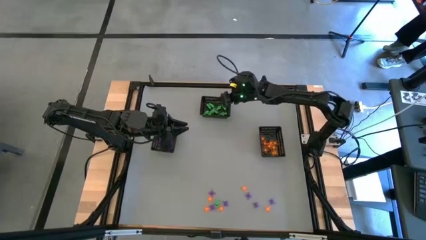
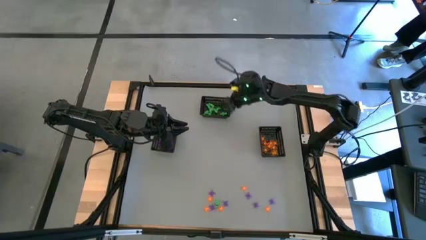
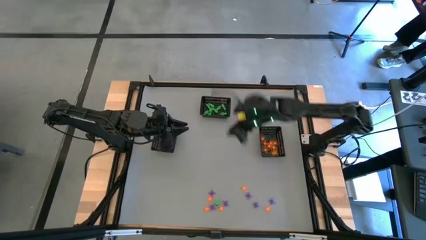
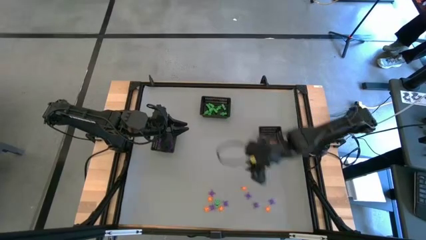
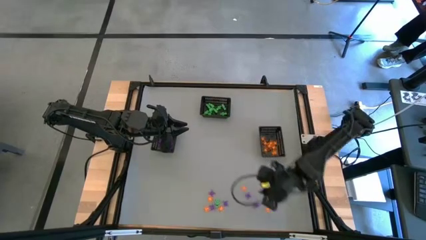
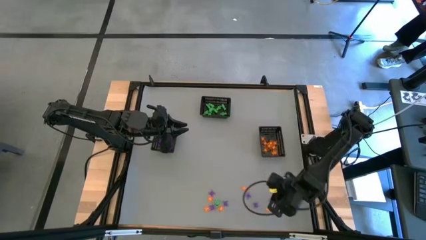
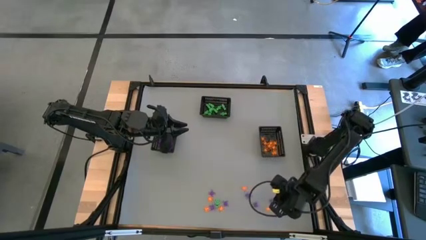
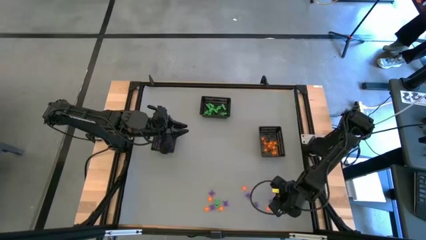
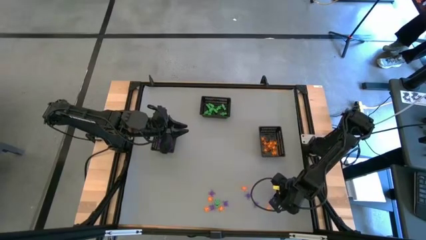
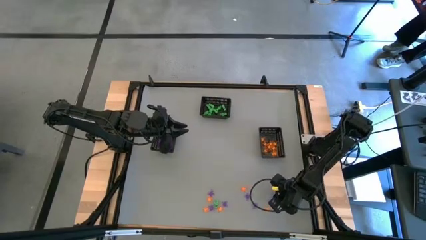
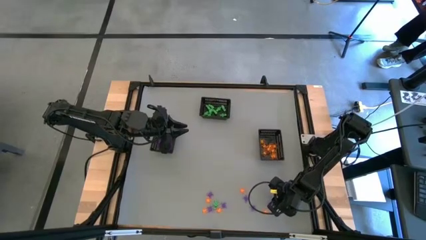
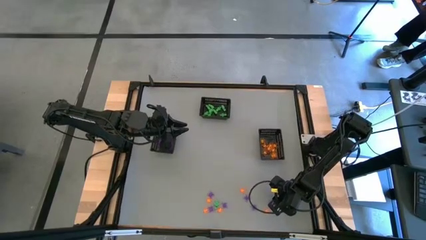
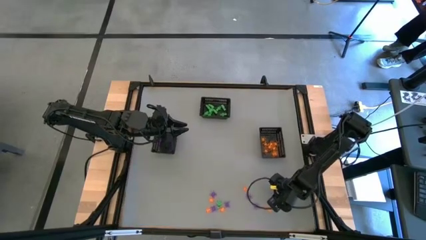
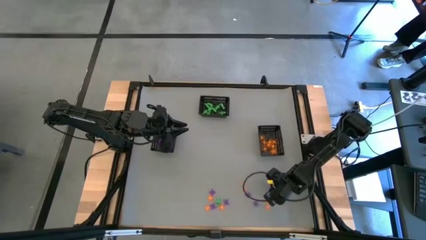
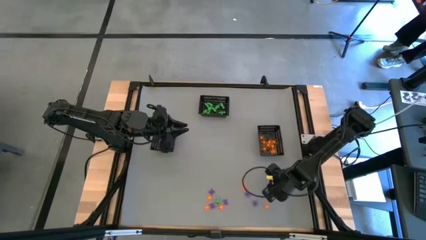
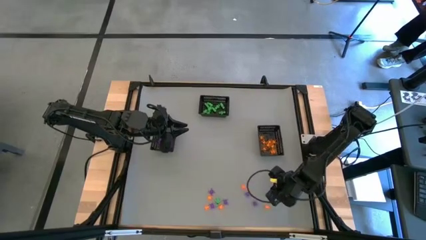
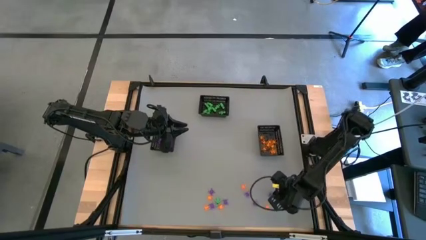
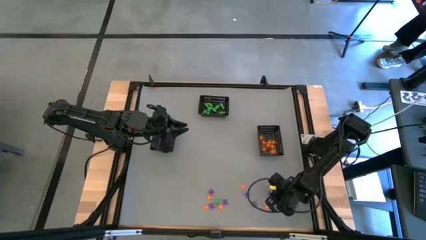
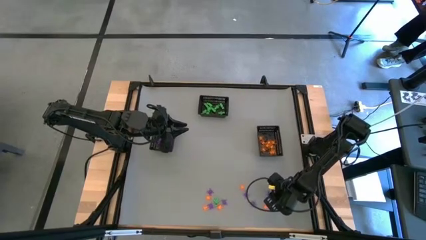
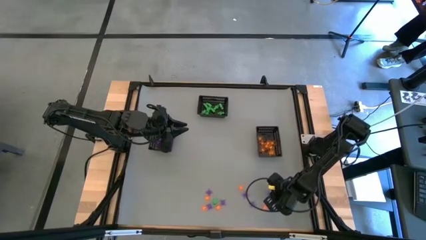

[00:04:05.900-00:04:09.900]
Task: Sort Halloween decoration
Put the violet spider toy into the left bin

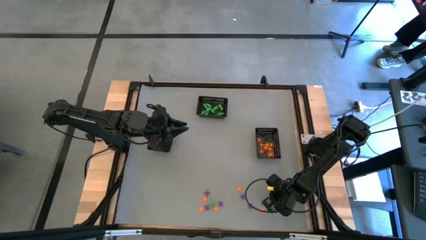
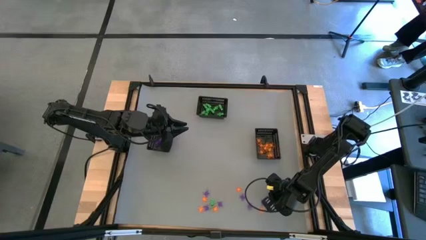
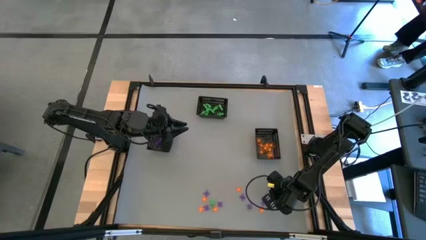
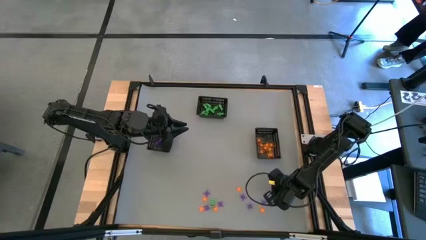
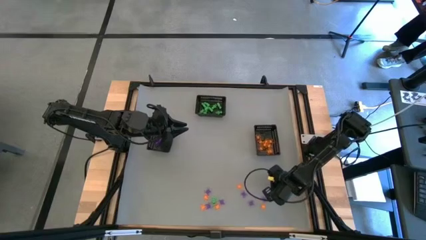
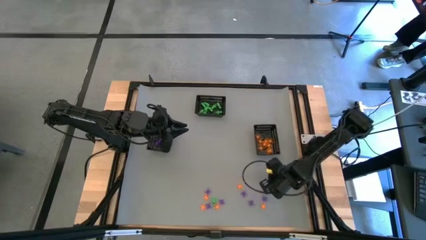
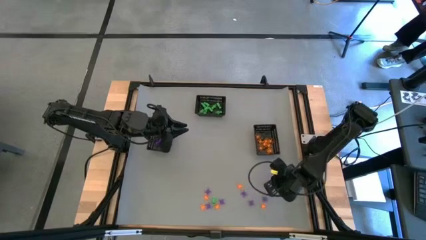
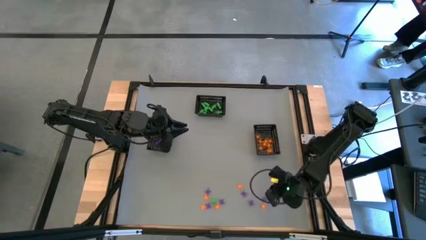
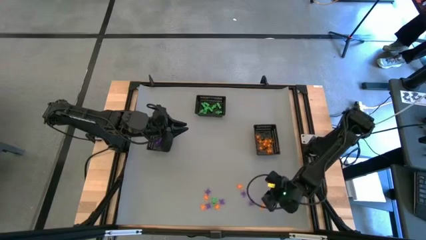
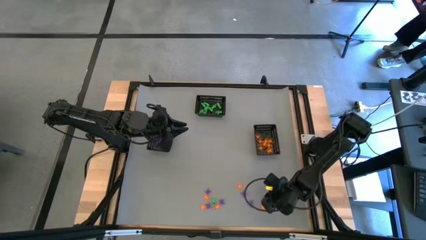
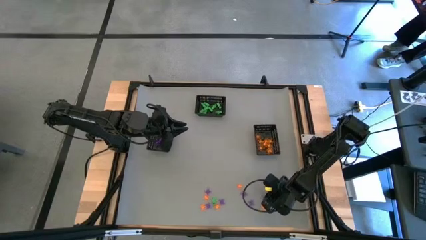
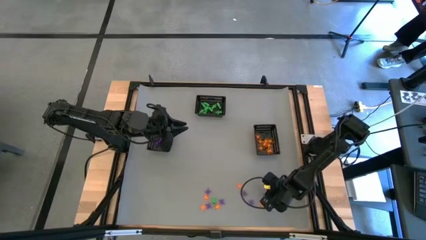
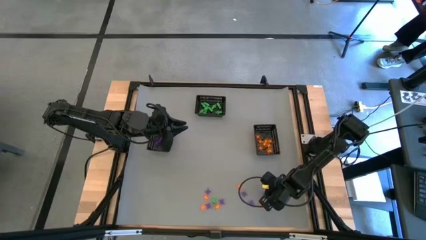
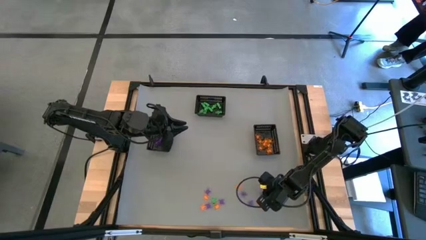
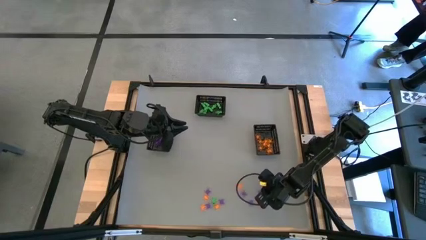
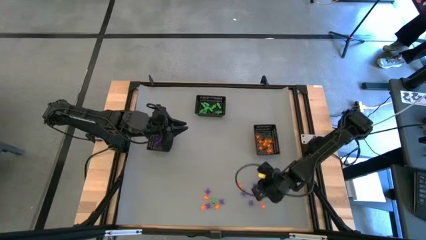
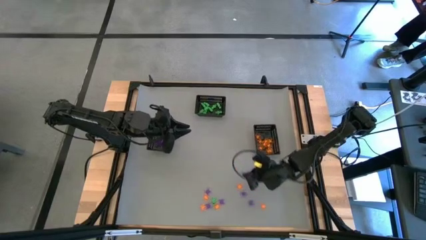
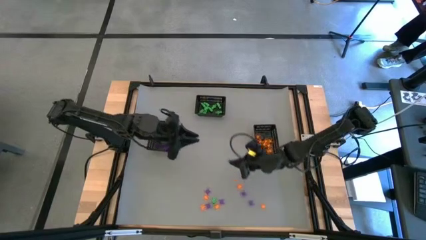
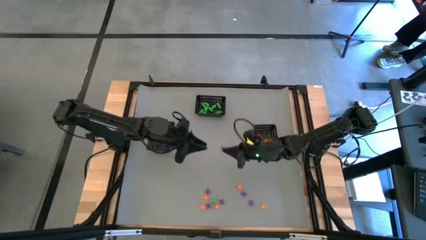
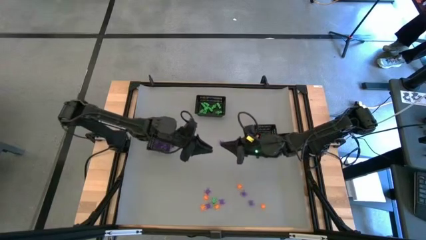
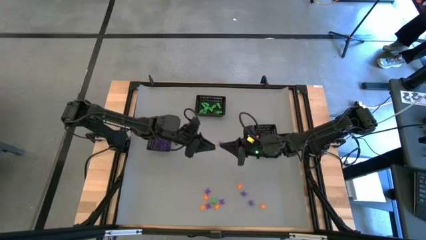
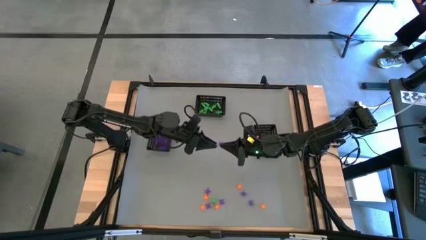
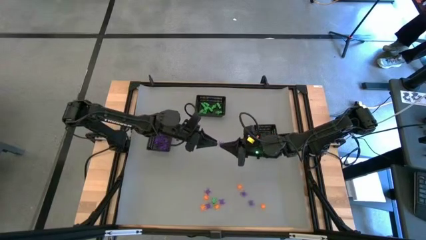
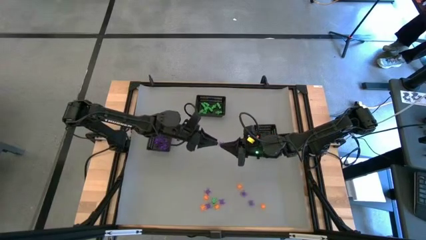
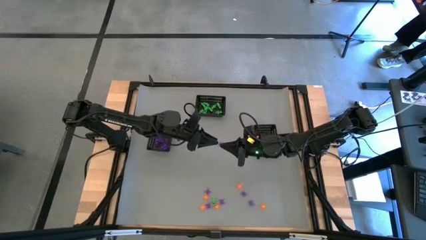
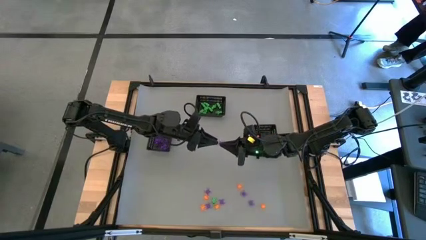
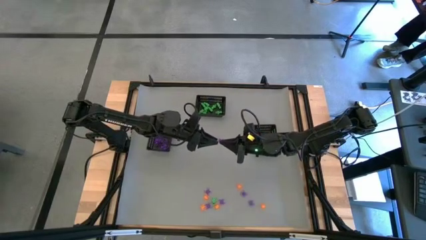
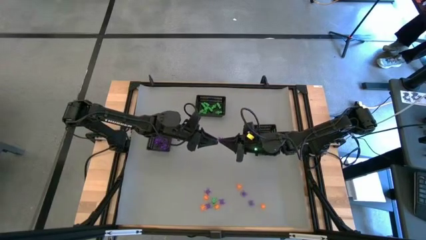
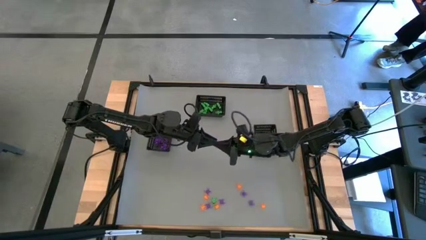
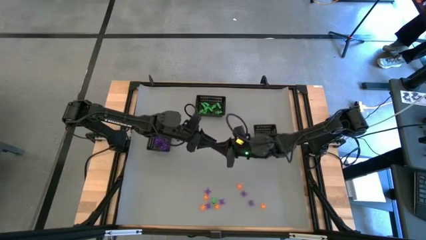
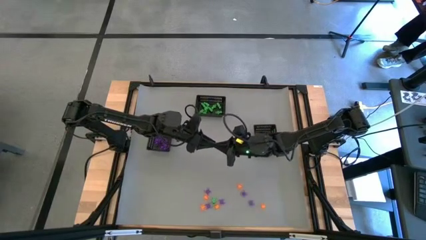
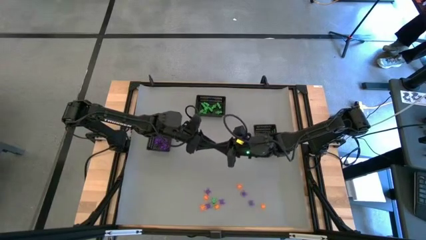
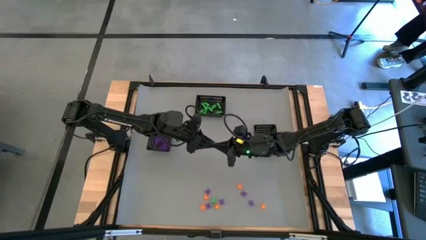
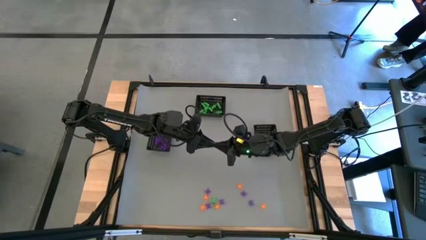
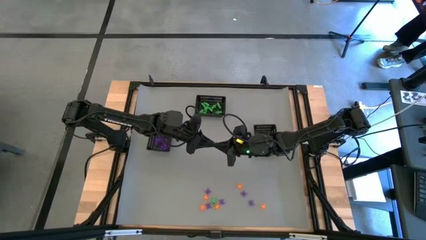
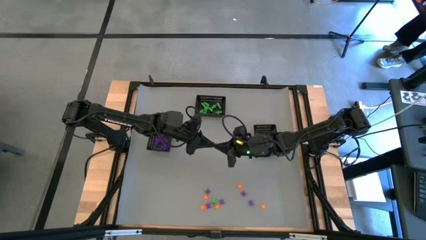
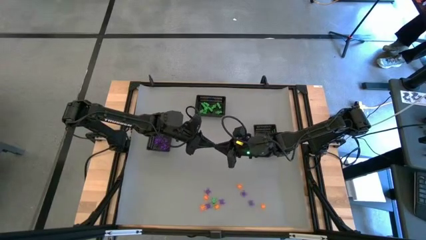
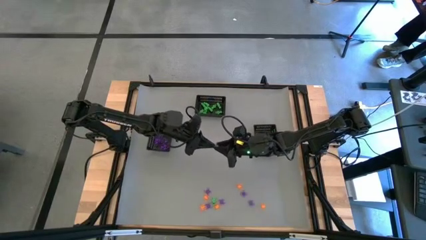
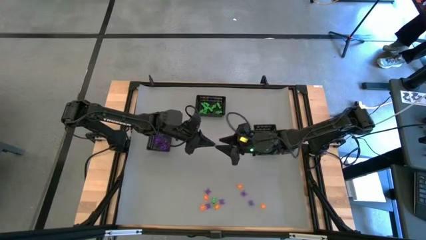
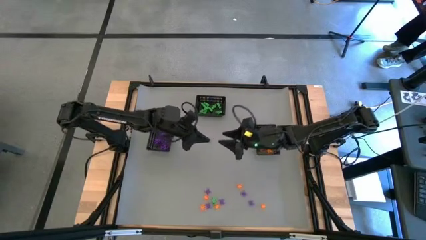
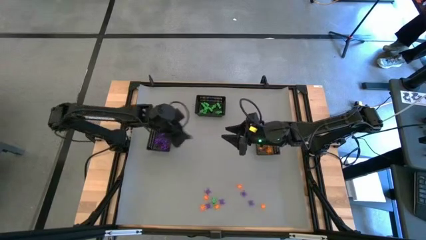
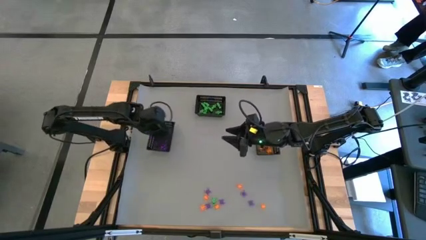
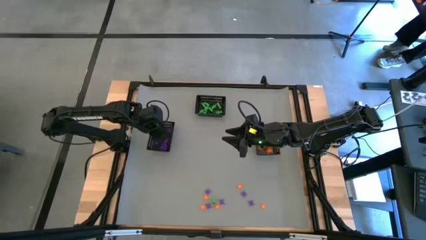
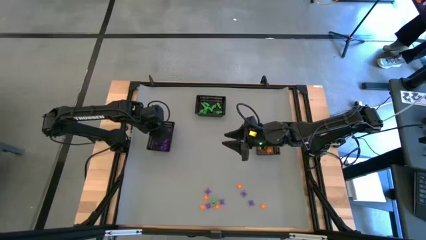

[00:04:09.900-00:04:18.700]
Put the violet spider toy into the left bin

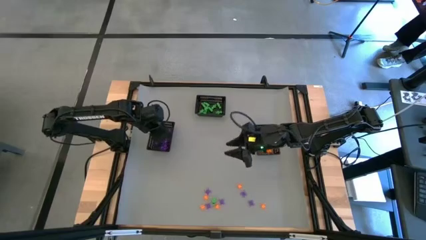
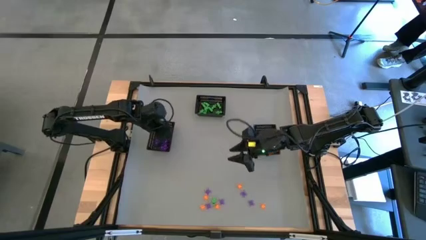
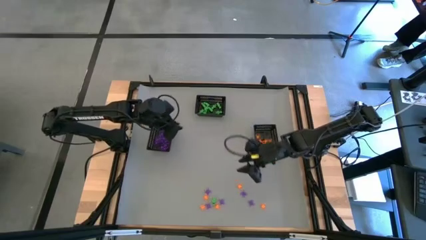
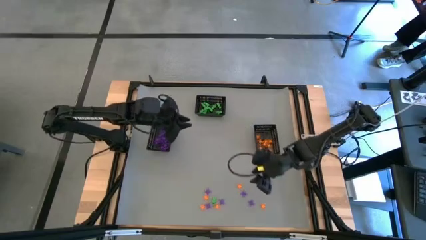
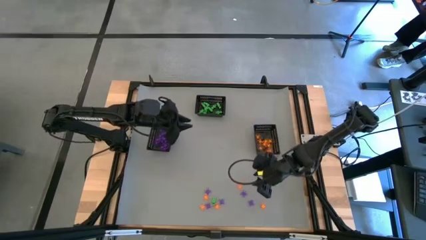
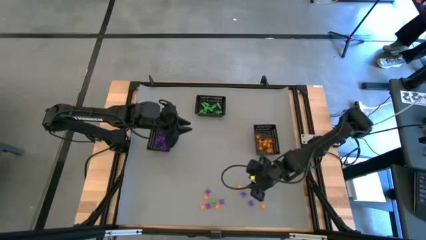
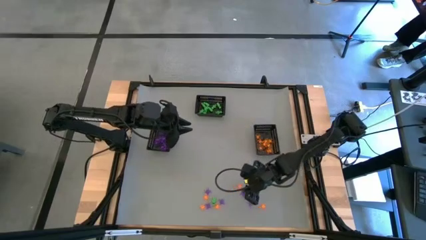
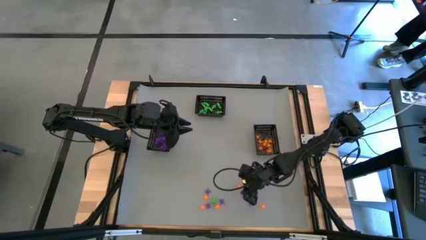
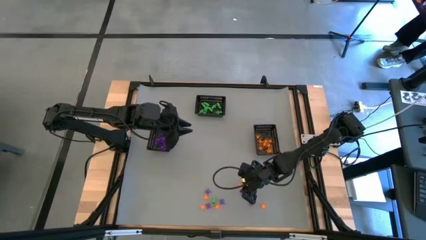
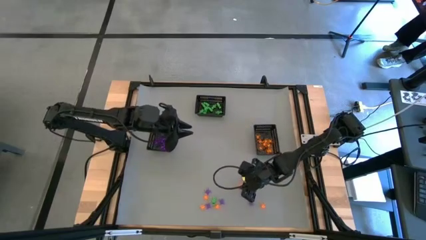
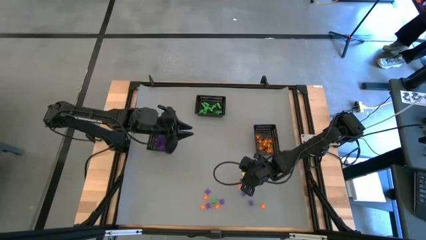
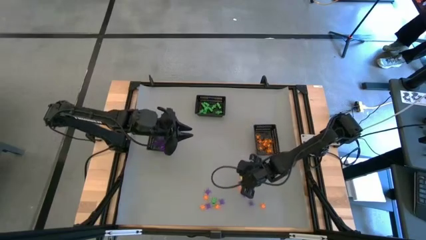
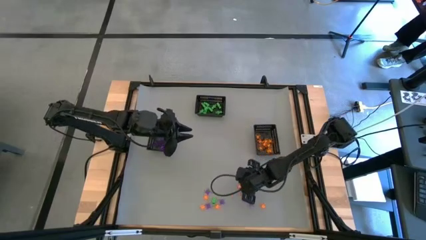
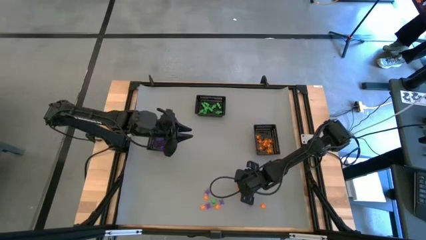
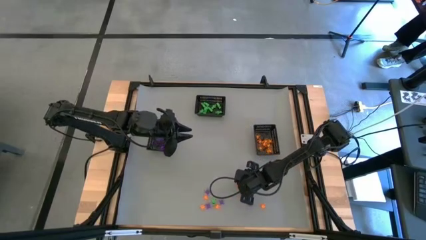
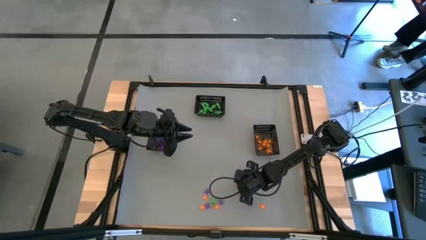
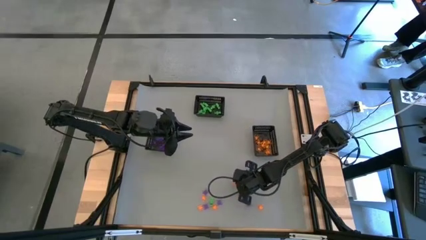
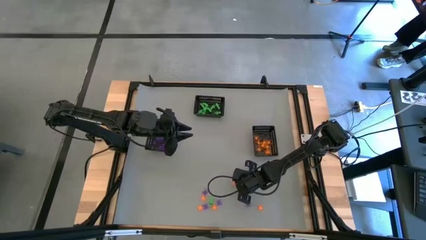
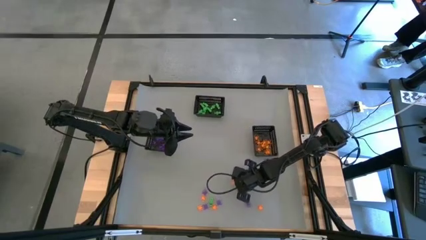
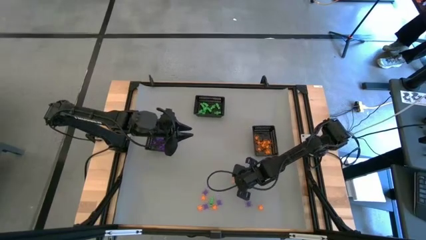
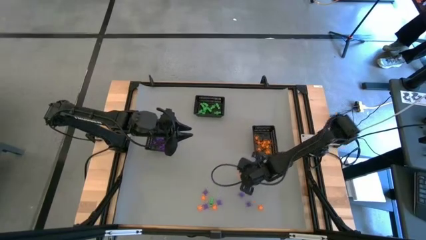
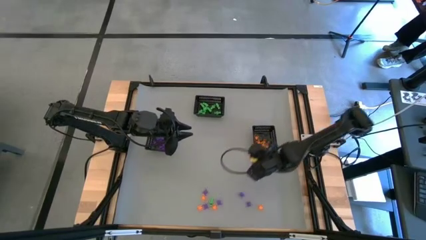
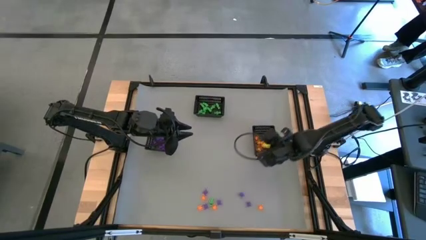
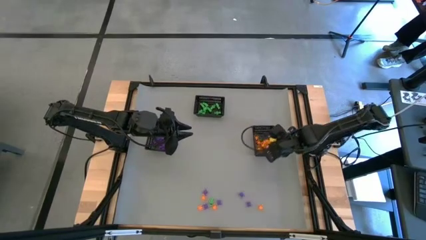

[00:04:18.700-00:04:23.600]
Put the orange spider toy into the right bin
